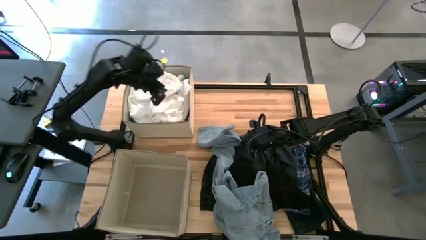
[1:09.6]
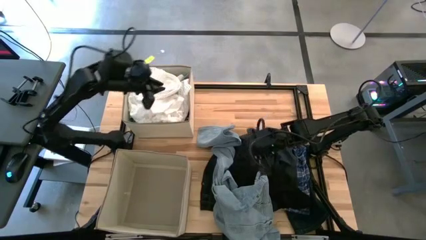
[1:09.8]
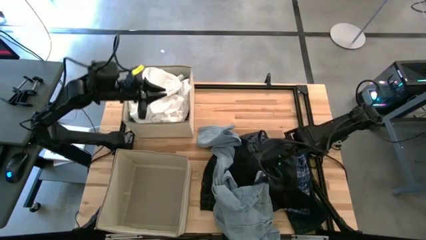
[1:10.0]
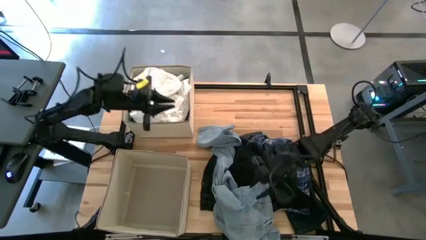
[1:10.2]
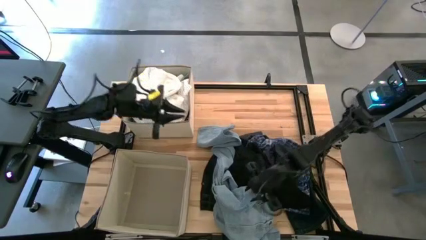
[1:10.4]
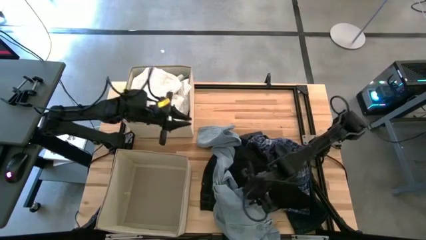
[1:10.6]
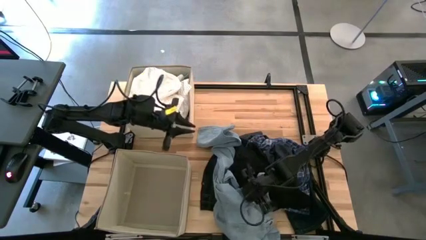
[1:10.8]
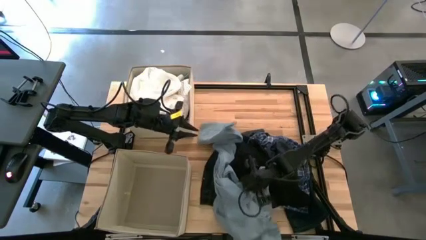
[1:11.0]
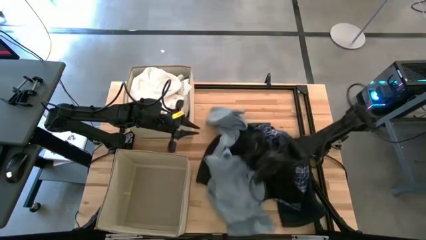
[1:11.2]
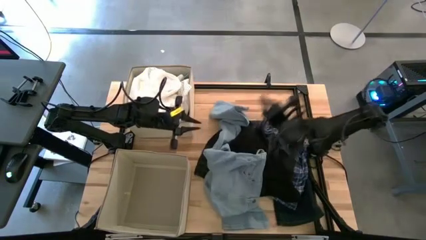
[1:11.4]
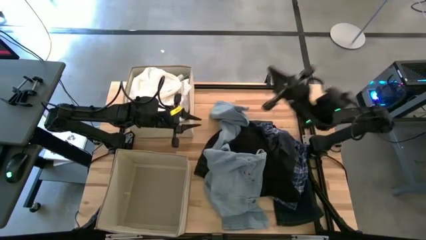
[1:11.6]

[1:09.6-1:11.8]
Task: Sort clothes
Put the blue jeans into the top brown laundry organizer

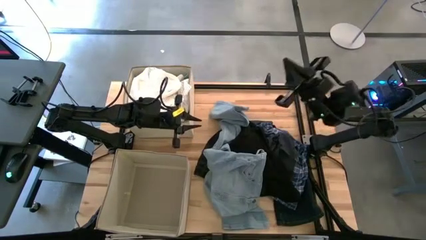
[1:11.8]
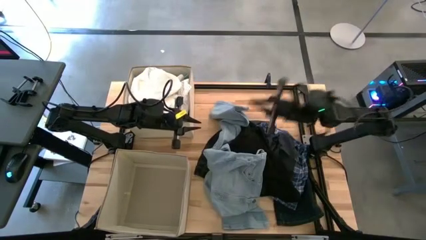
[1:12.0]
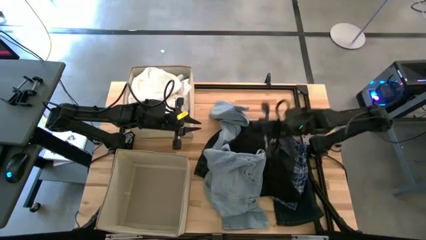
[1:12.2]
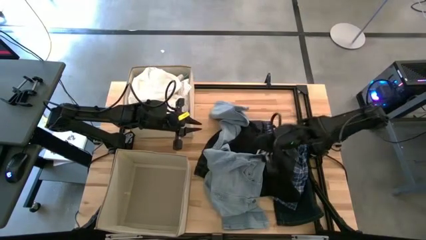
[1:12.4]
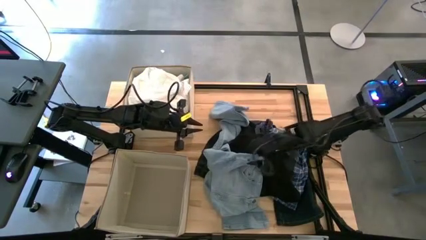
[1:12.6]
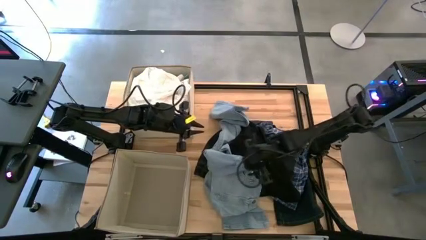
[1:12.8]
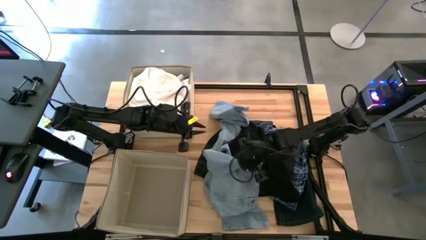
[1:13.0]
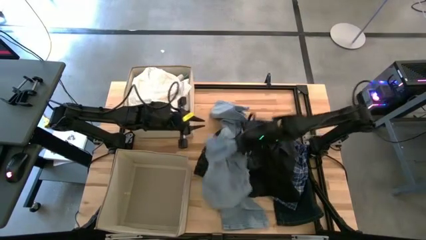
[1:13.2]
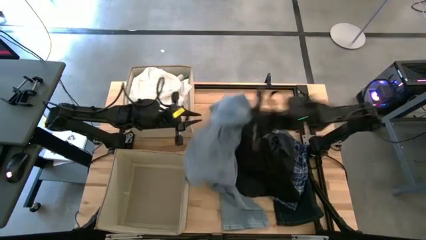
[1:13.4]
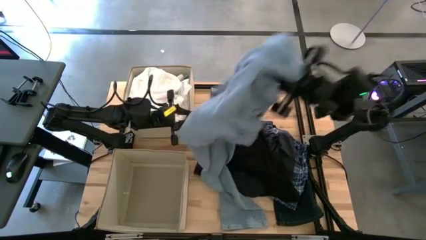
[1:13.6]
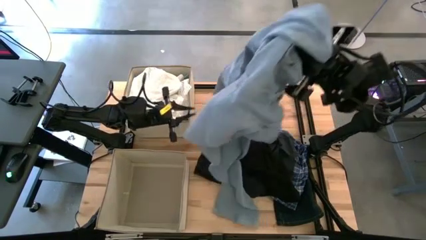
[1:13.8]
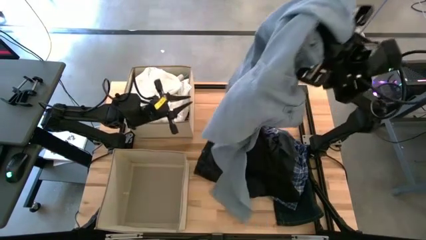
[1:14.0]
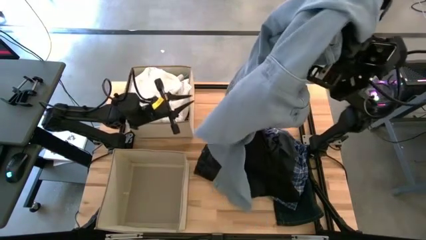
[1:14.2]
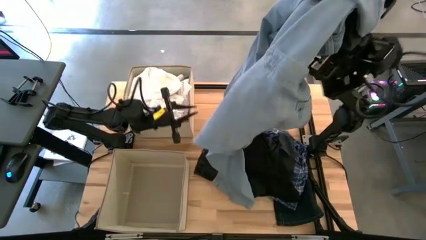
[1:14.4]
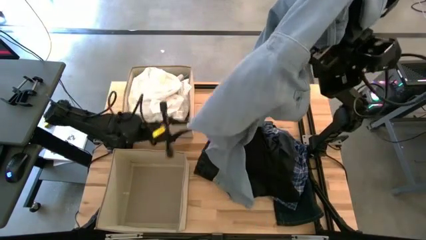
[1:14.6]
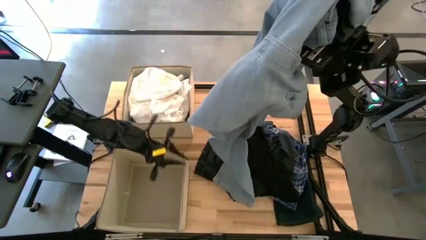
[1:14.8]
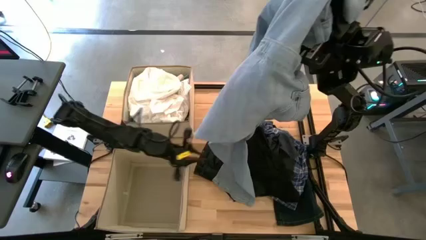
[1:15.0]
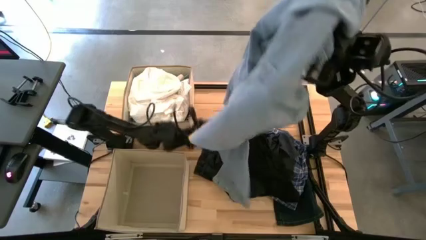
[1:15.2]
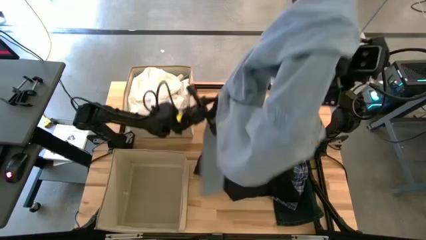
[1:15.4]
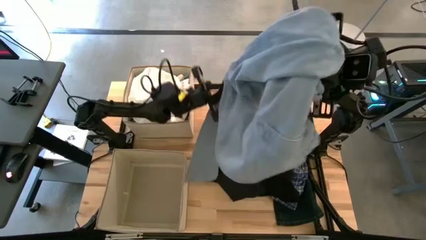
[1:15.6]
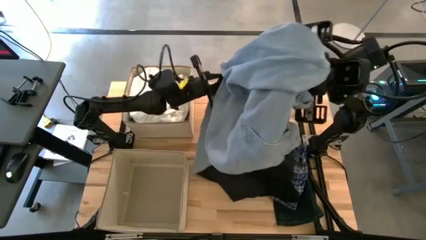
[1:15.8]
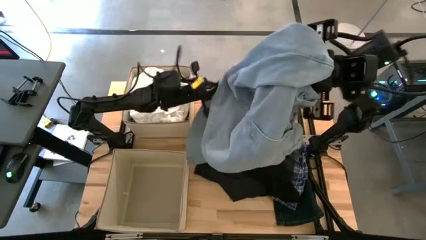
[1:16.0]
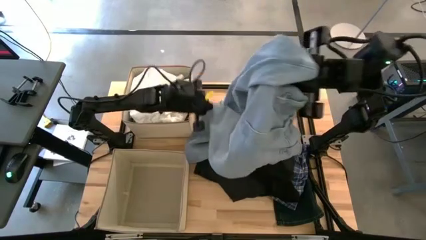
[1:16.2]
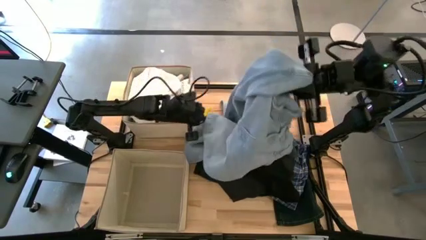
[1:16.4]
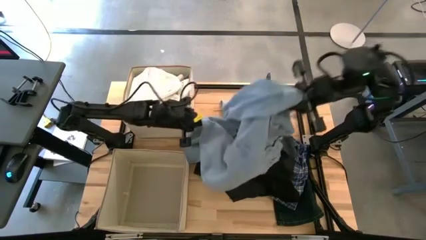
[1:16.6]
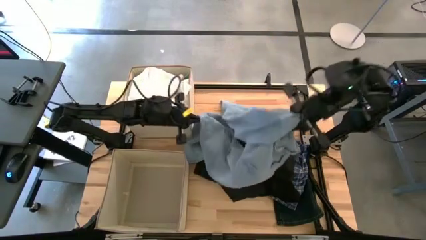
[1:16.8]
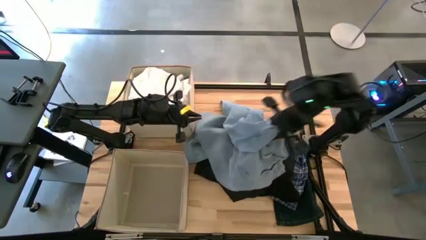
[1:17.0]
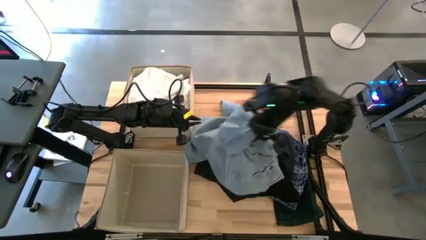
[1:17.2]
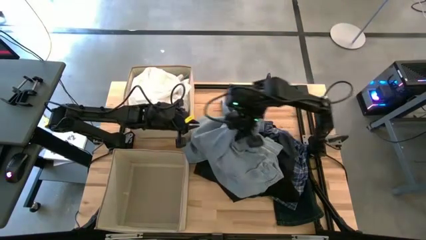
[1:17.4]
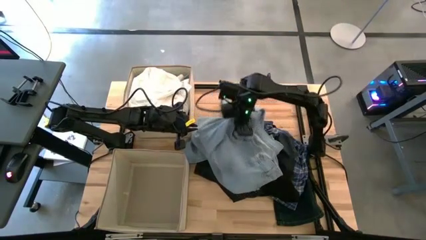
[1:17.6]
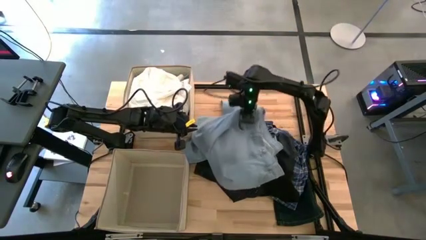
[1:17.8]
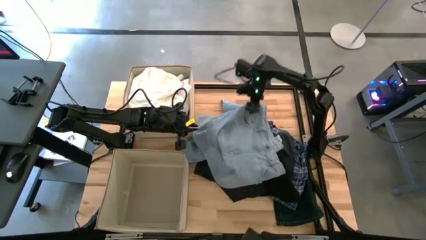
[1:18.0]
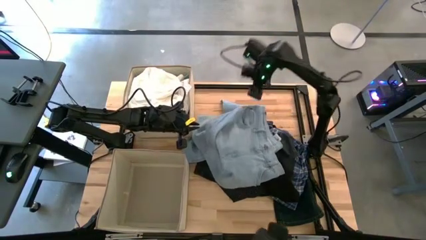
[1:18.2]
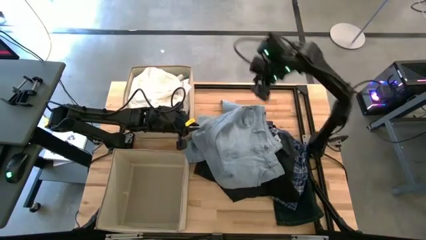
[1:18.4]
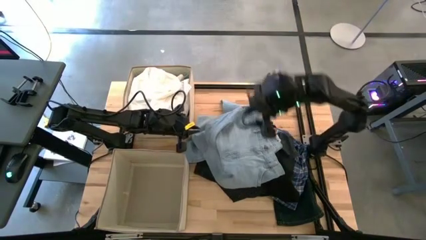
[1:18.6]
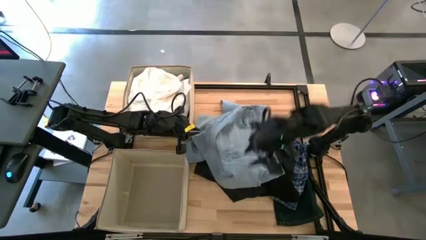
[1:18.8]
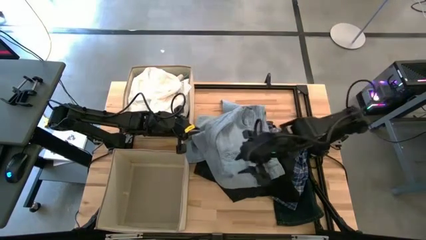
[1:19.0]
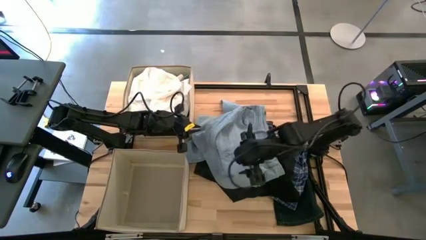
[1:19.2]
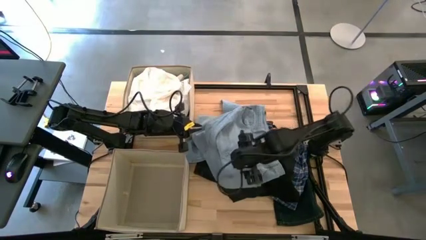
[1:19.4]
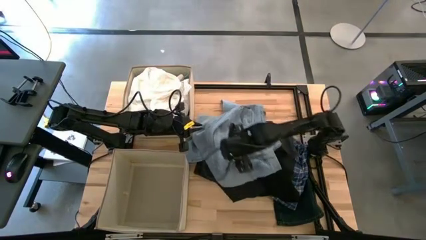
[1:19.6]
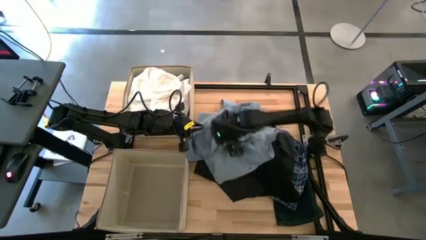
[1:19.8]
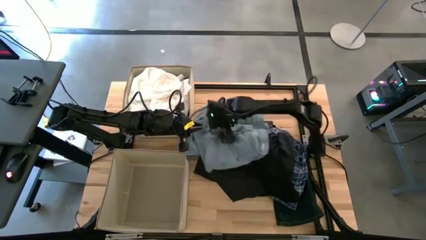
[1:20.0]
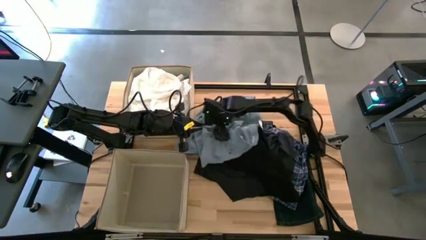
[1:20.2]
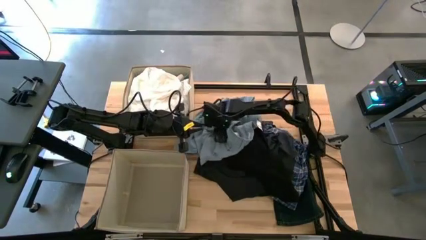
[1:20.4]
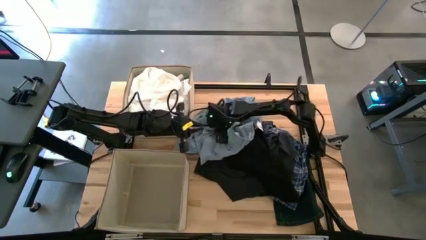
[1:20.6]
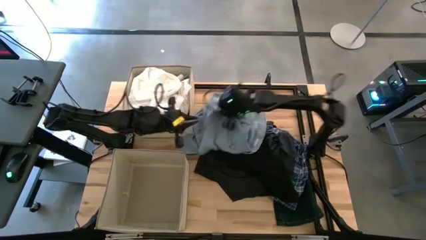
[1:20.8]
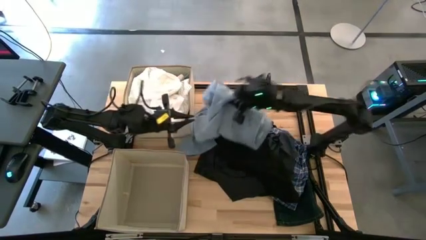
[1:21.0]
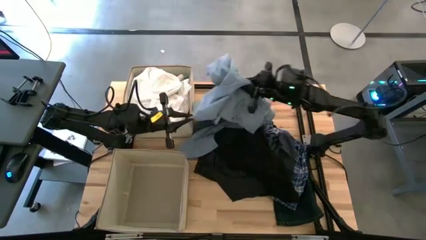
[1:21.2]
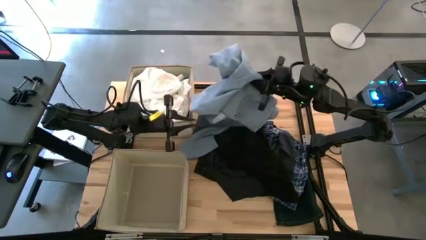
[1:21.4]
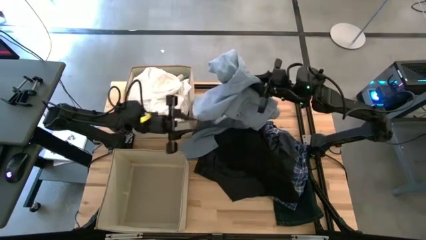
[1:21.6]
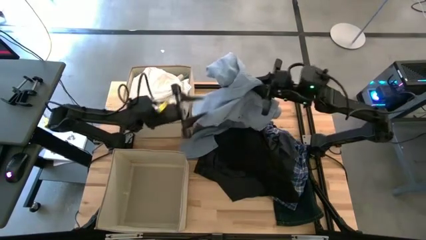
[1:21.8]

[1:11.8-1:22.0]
Put the blue jeans into the top brown laundry organizer

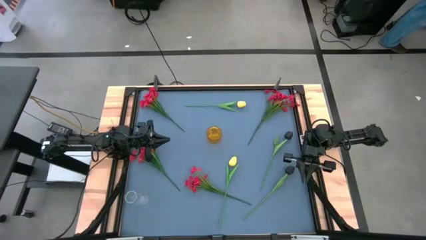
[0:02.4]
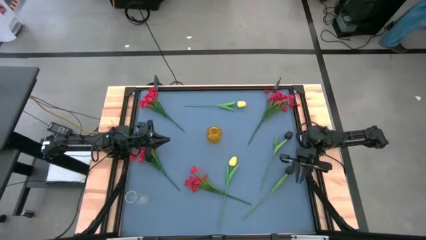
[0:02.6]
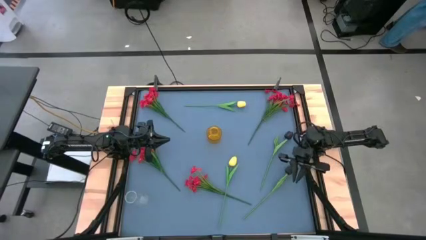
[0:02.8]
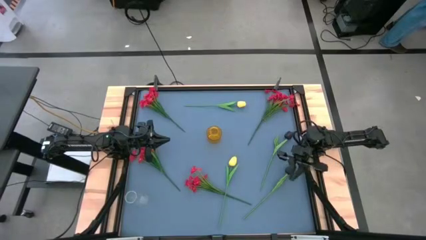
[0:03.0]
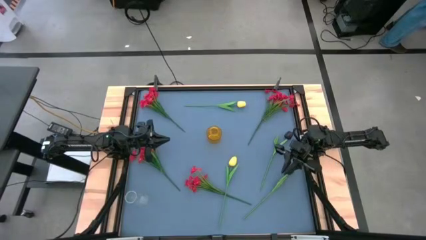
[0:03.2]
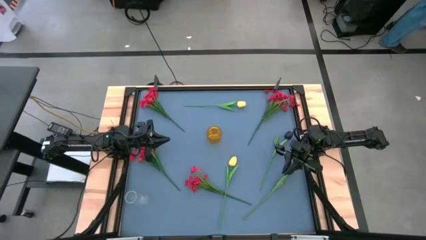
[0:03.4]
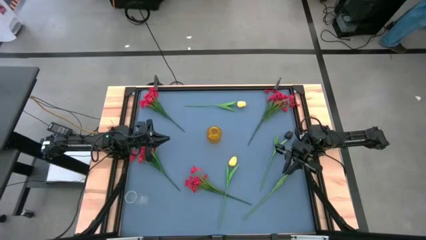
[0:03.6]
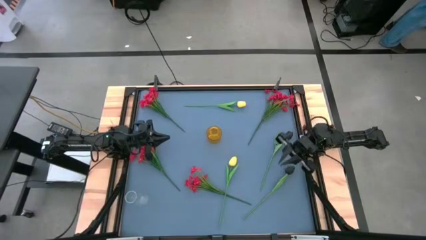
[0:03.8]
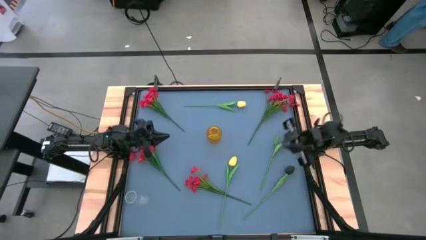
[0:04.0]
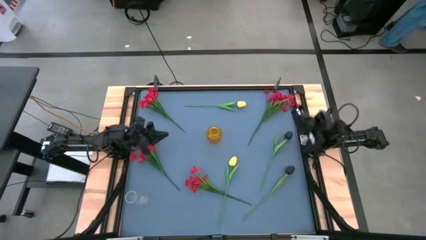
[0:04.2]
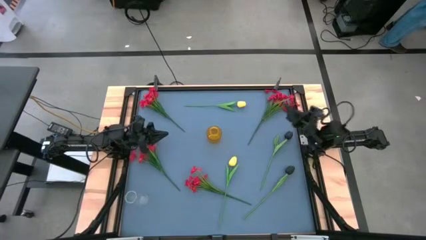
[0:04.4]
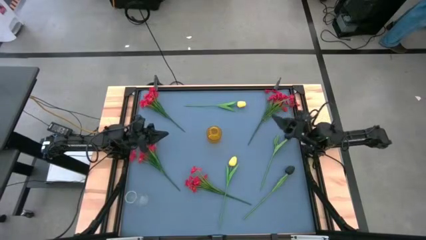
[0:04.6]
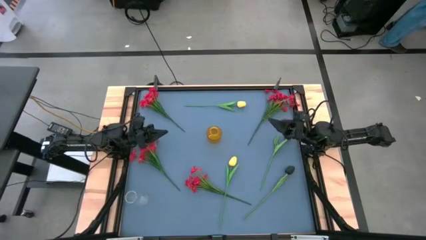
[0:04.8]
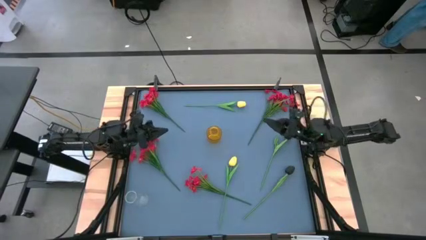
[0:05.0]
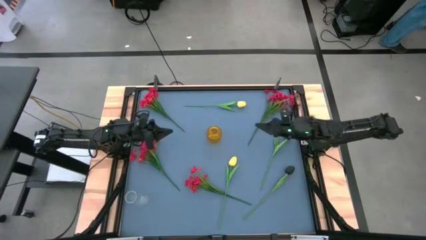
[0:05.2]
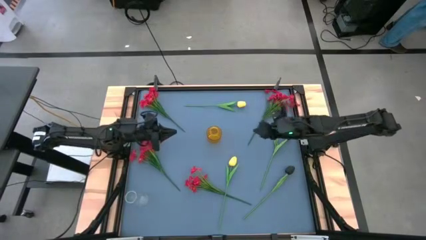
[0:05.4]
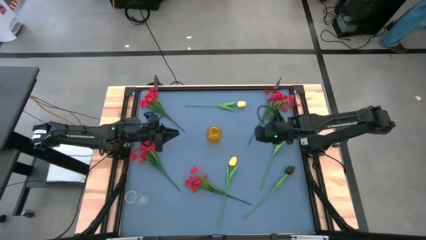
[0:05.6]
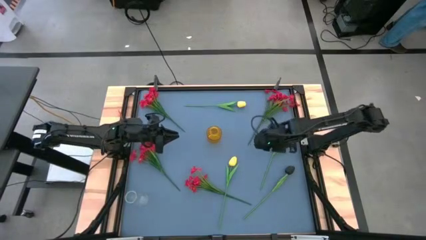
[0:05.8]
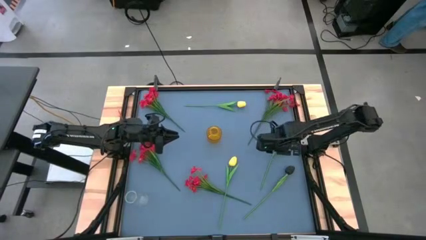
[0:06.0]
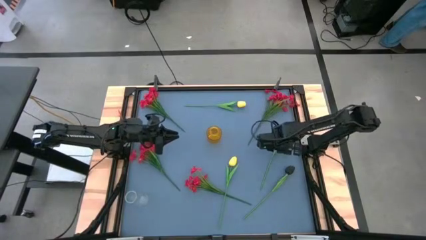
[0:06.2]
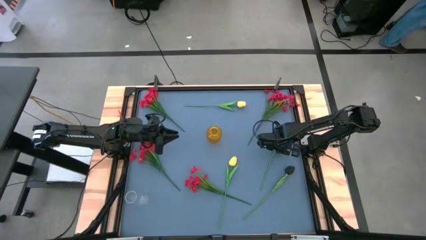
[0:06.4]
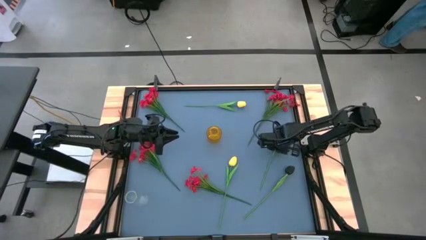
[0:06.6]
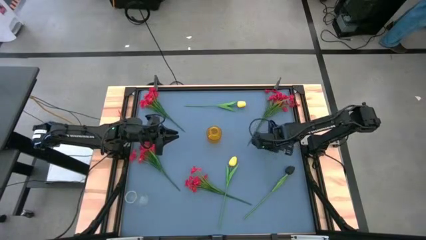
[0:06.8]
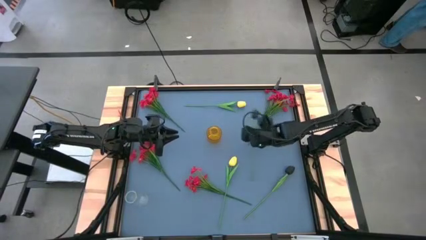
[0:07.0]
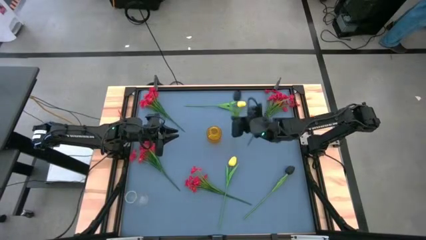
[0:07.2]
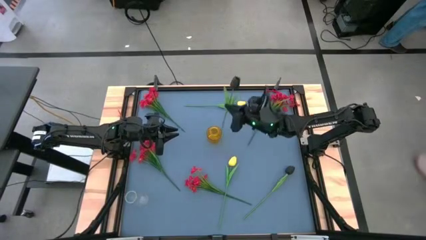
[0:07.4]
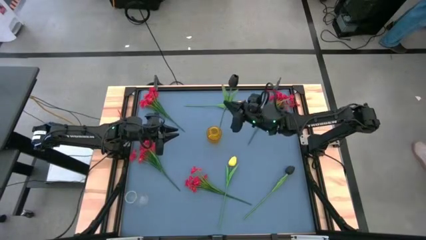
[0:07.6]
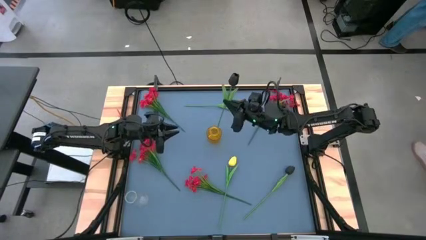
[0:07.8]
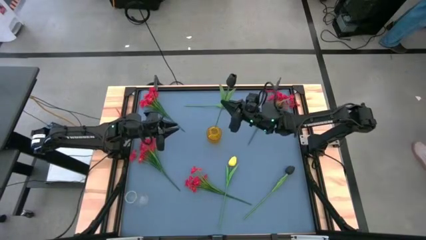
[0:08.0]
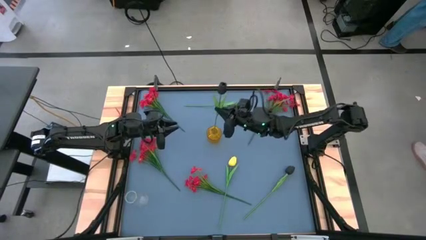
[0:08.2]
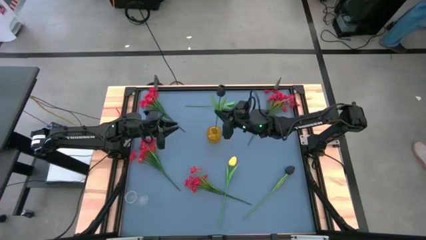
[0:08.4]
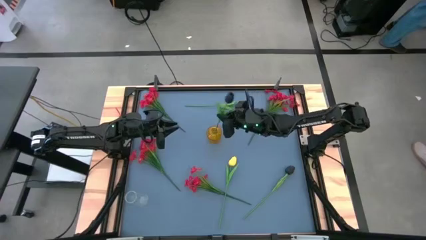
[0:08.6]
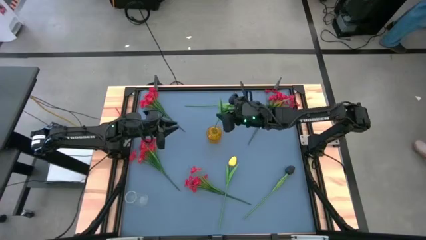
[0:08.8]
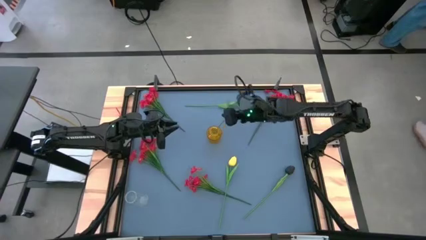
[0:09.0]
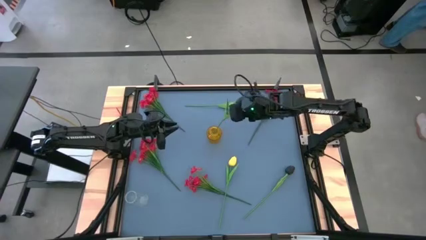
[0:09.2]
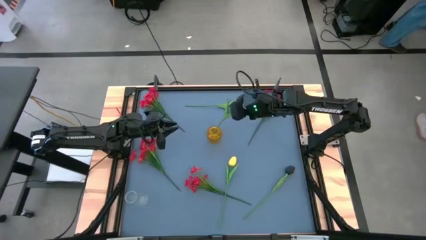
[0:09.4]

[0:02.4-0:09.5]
Task: Sort flowers into vase by color
Put the top black tulip into the yellow vase
